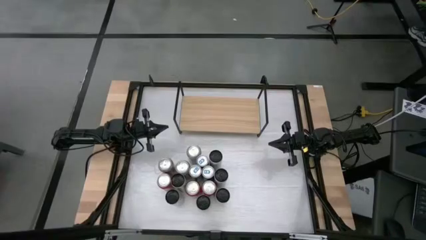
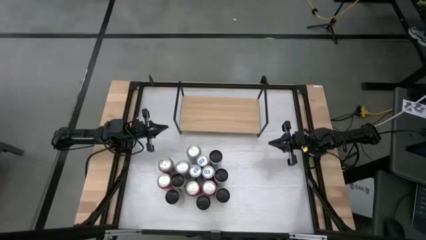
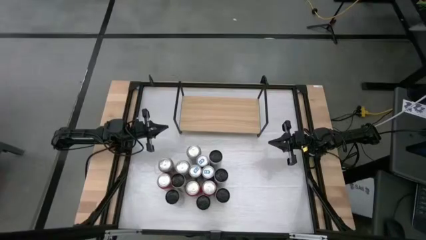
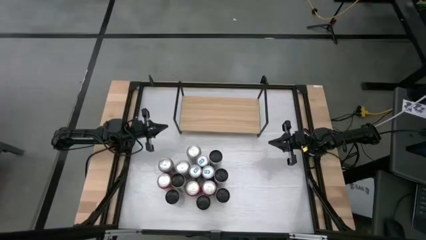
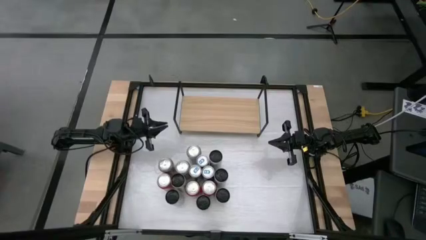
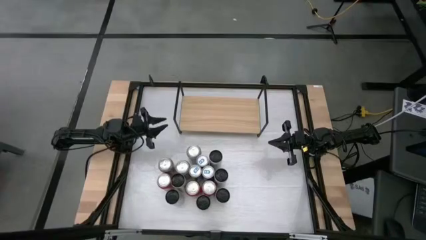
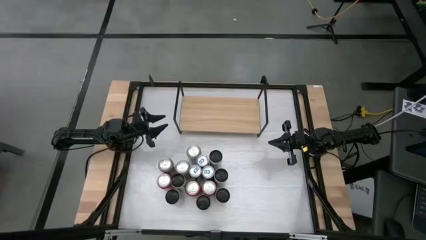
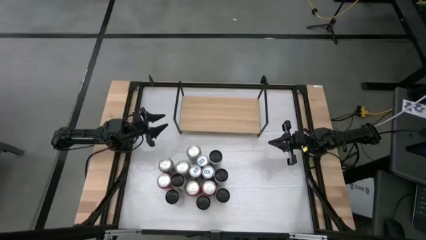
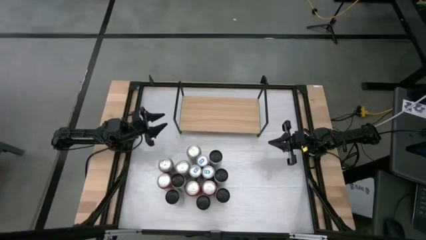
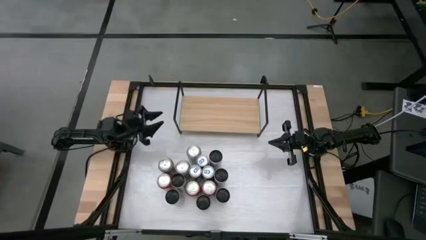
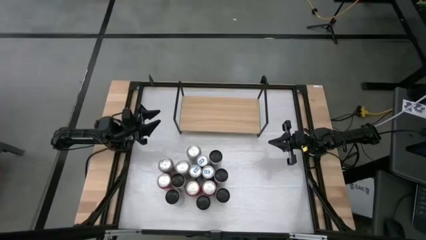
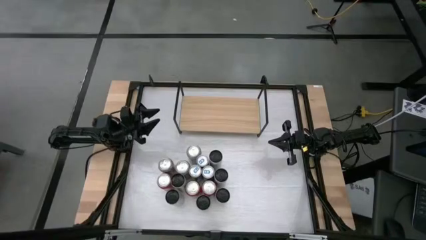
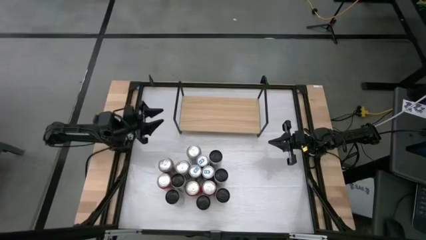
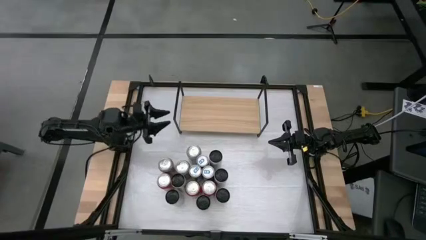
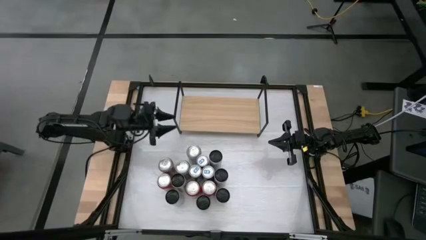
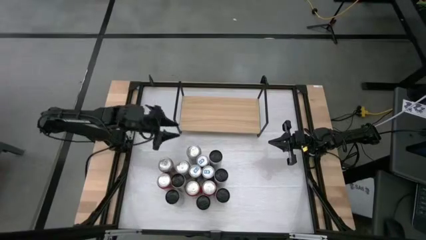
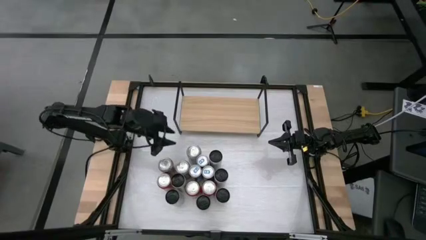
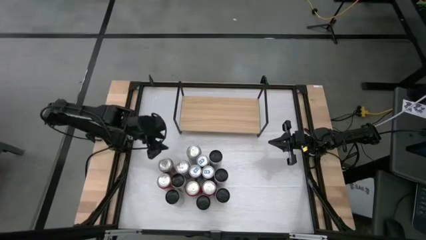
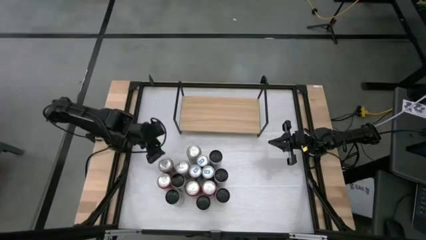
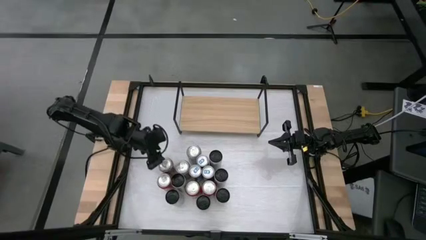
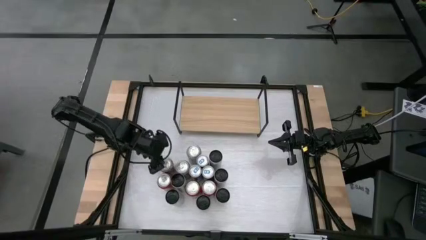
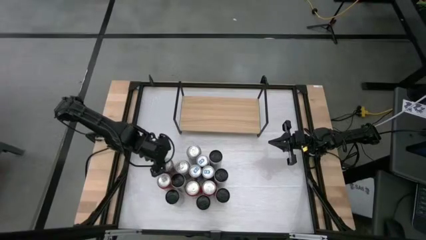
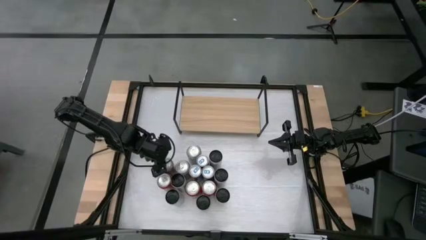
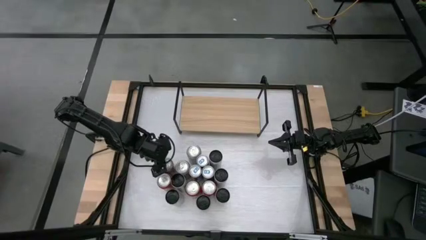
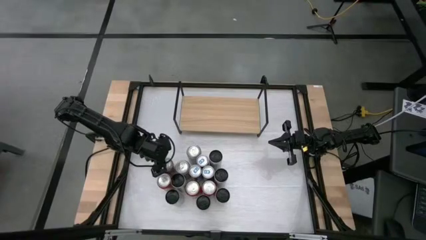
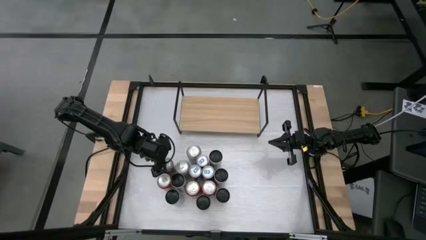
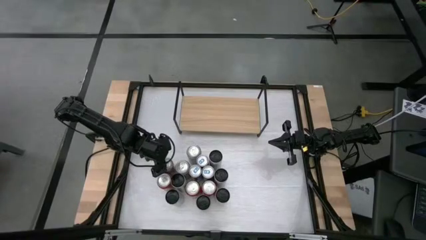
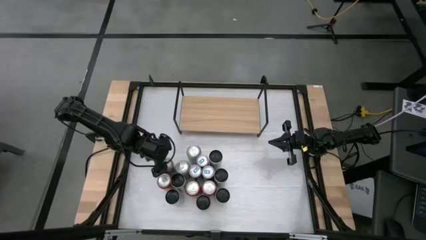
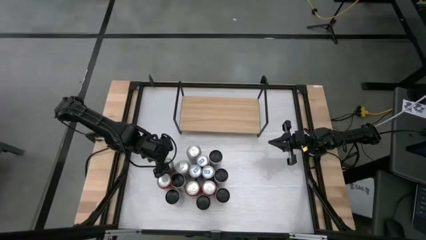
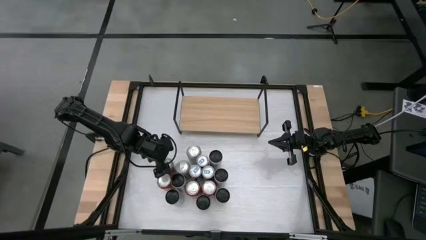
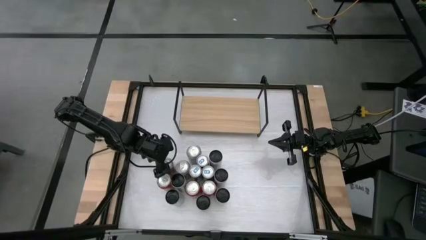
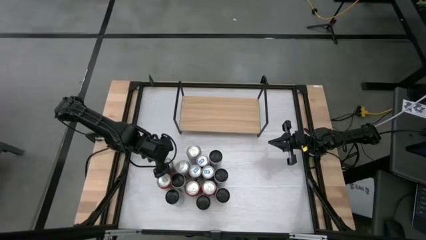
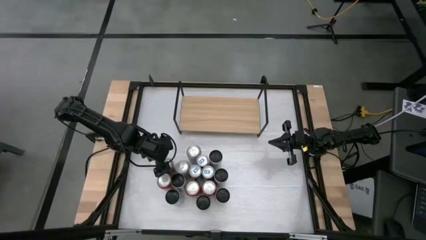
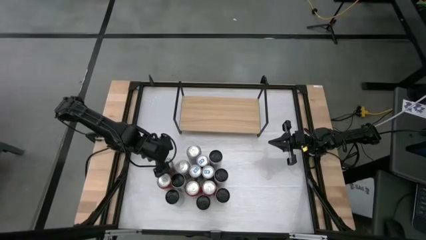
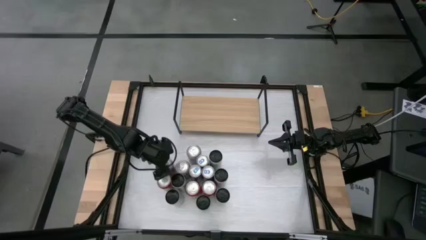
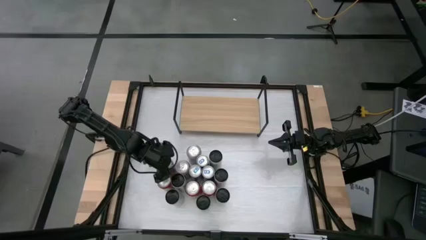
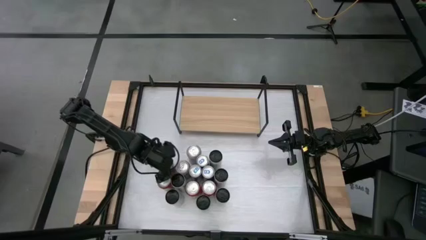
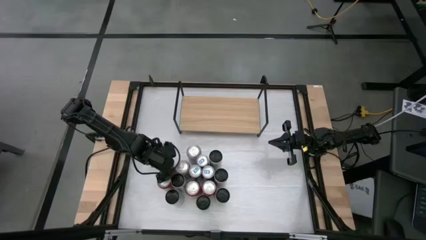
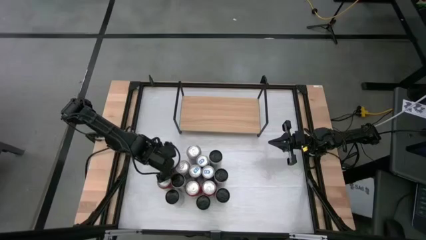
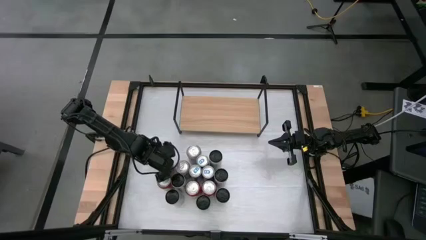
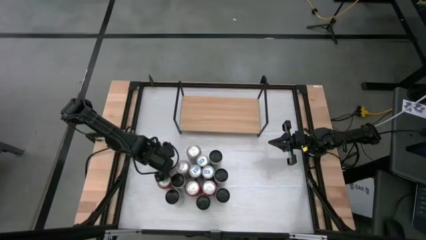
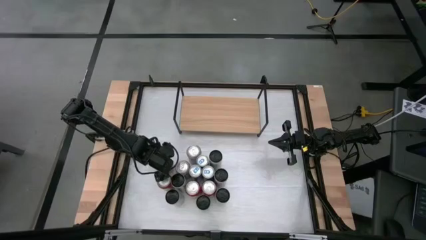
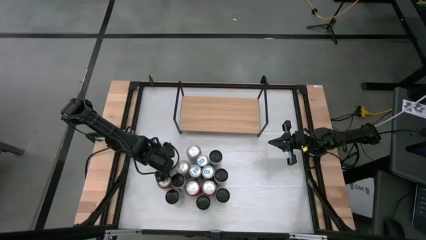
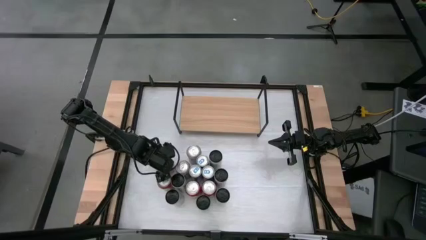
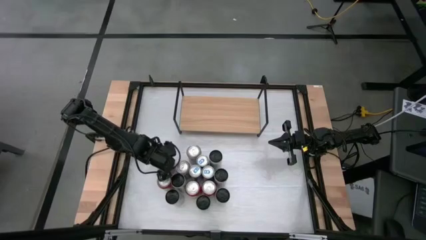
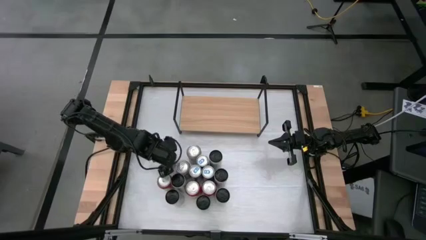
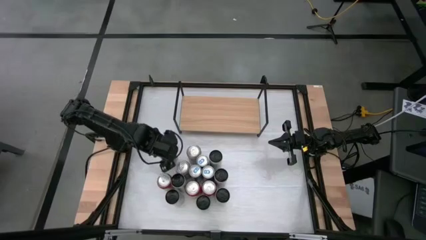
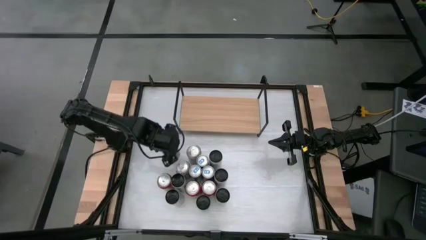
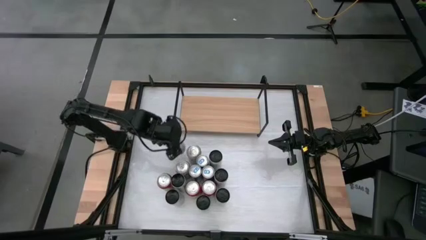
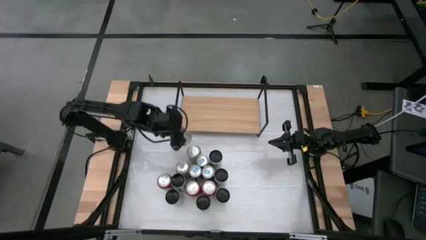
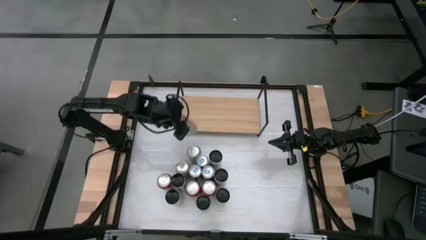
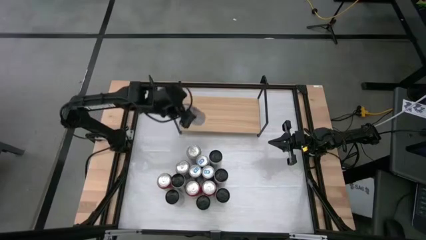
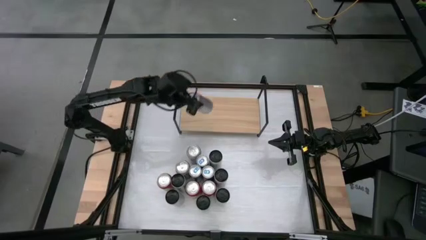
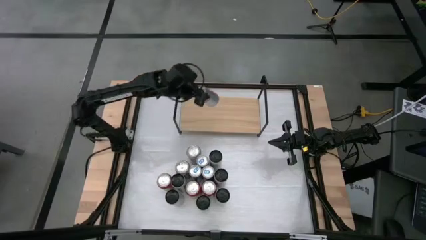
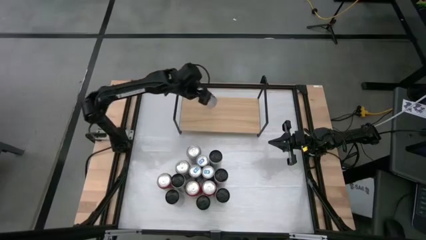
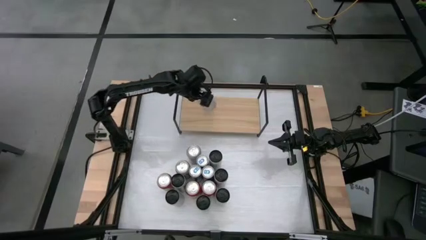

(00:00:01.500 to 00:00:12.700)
Task: Place canned beverage on shelf
Put the red silver soda can onto the shelf

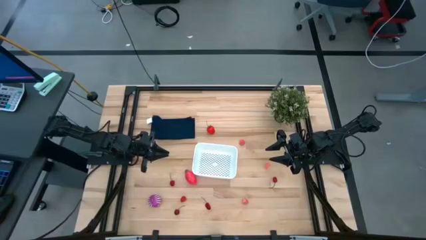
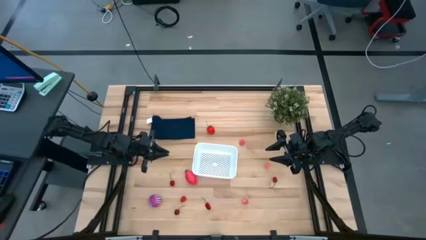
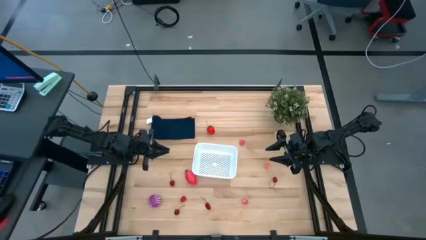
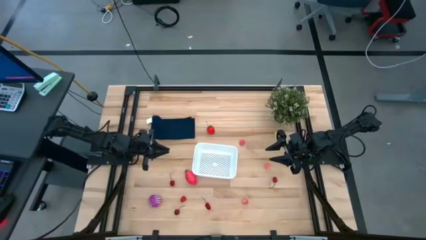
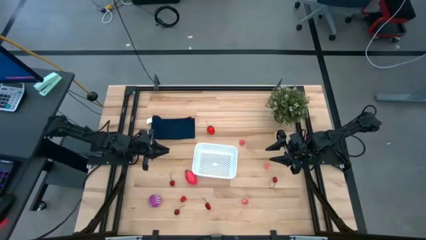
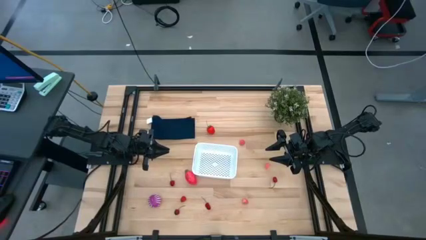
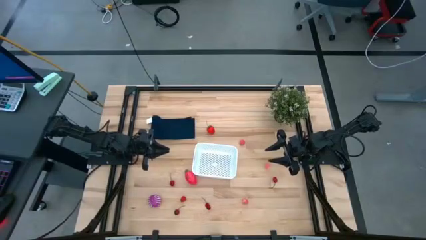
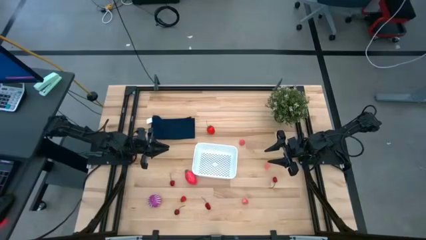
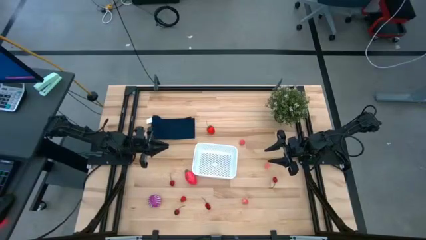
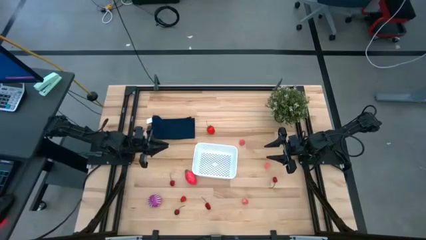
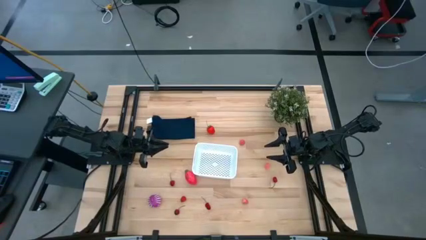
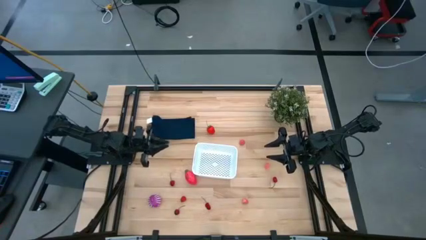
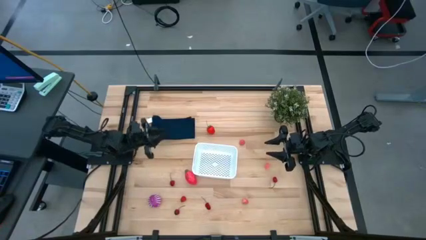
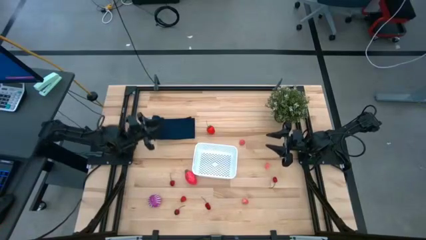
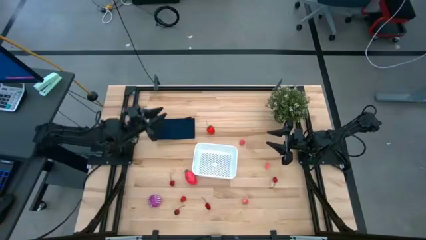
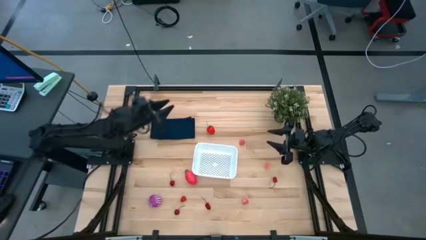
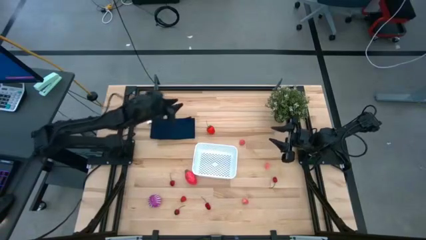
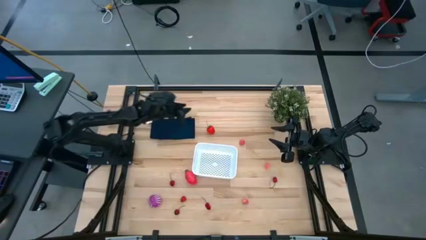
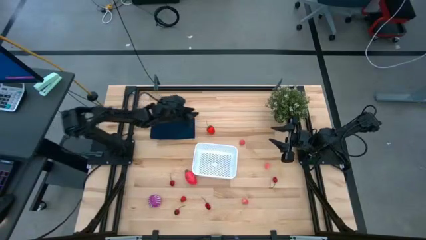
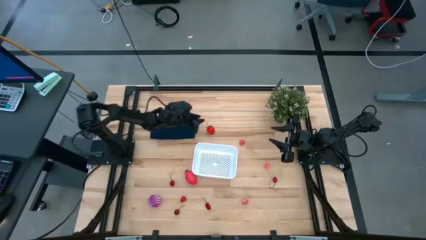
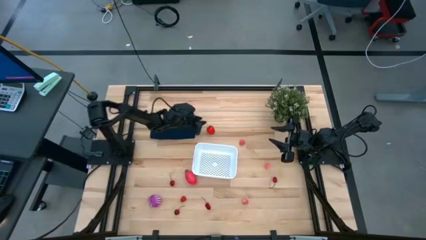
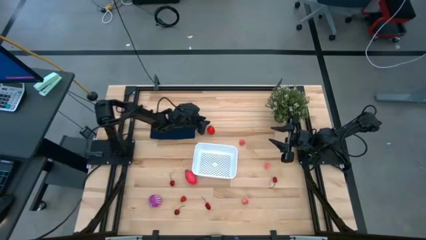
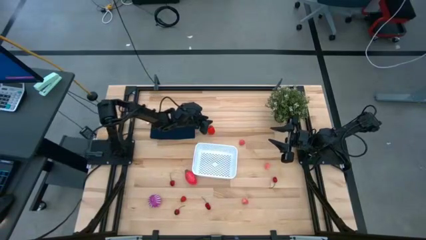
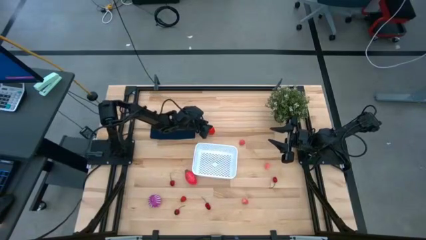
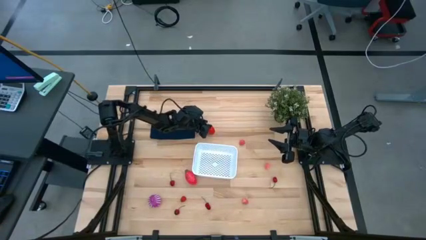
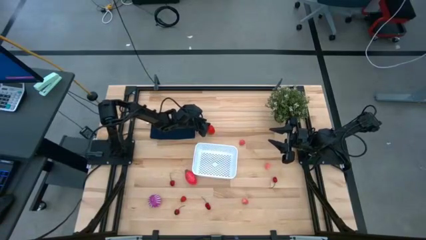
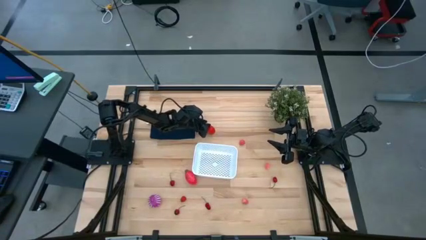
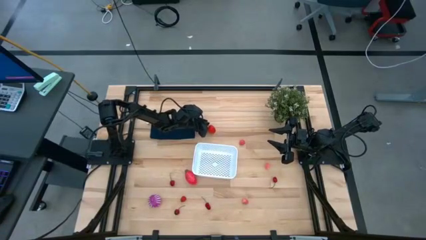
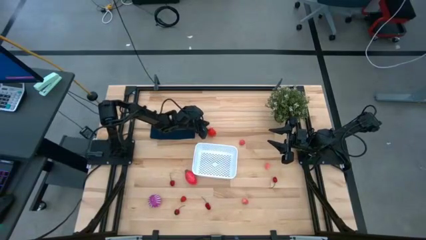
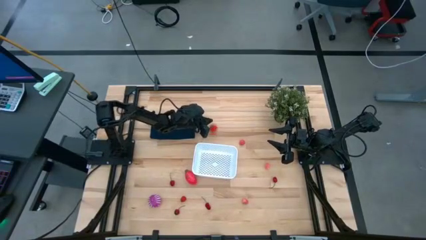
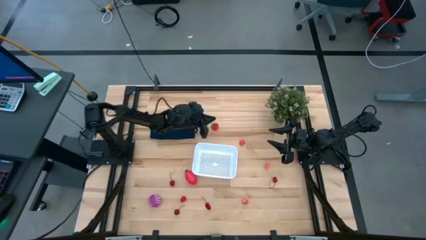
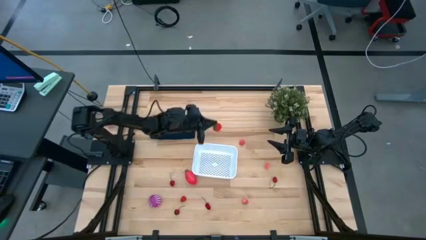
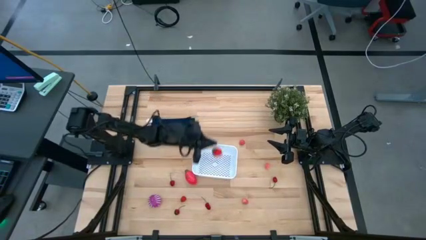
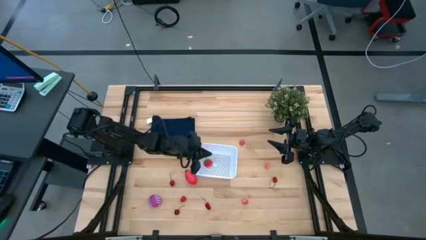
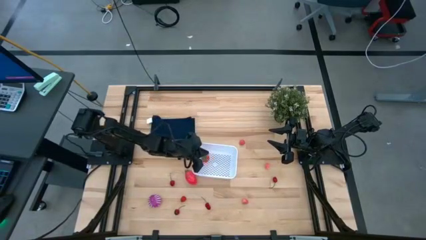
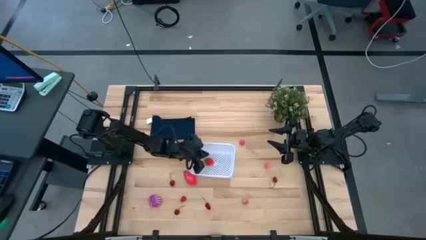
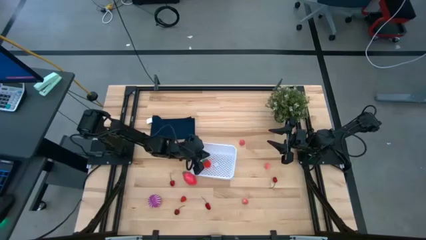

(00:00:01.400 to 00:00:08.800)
Task: Pick and placing Produce into tupperware
Put the strawberry into the white bin
